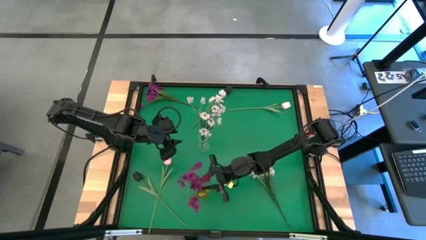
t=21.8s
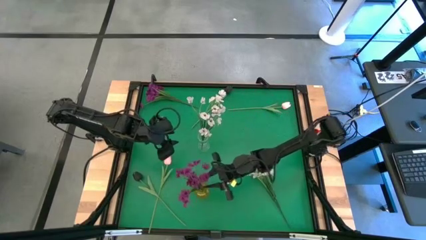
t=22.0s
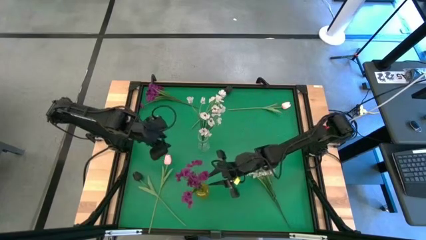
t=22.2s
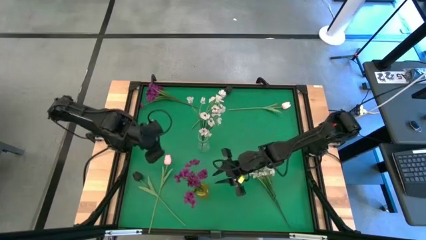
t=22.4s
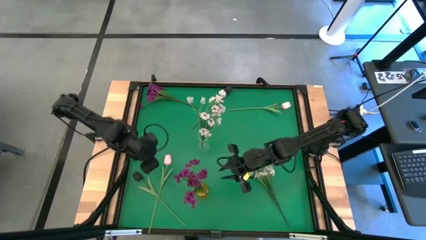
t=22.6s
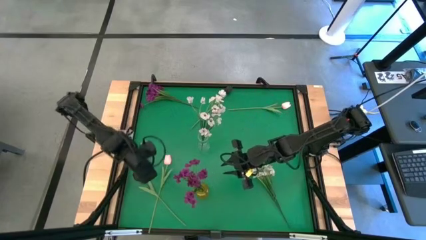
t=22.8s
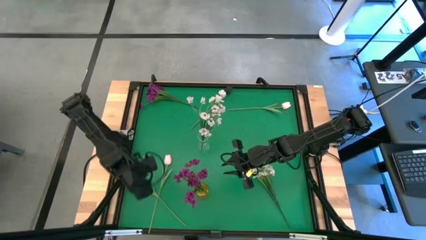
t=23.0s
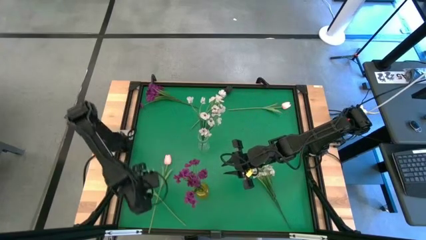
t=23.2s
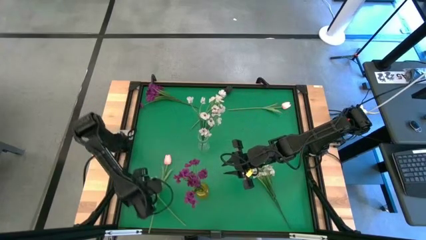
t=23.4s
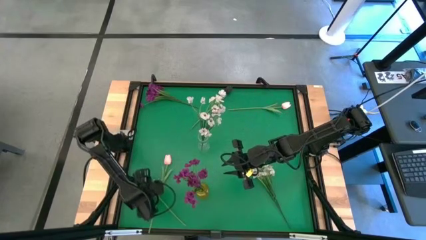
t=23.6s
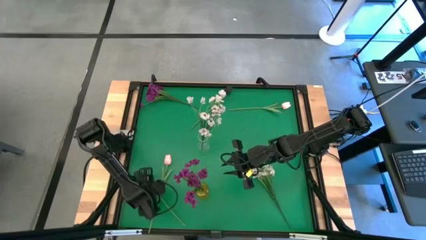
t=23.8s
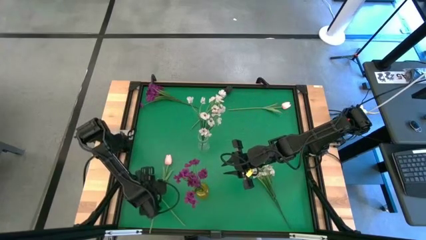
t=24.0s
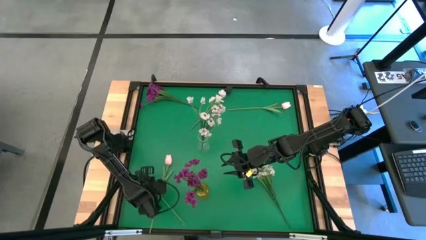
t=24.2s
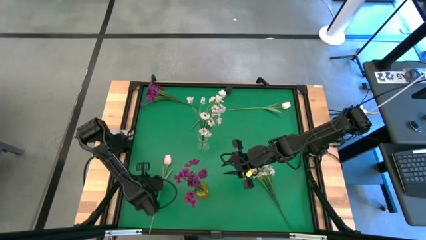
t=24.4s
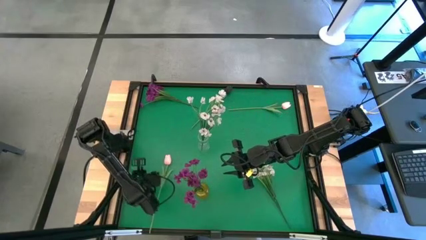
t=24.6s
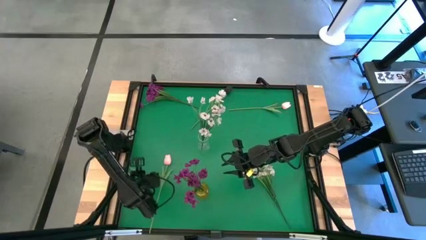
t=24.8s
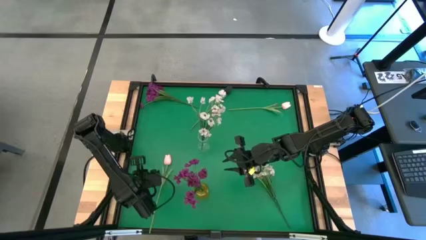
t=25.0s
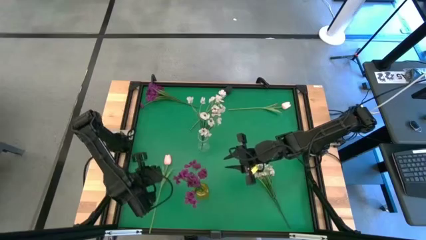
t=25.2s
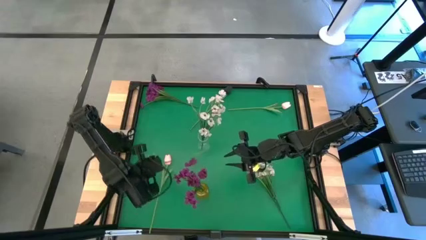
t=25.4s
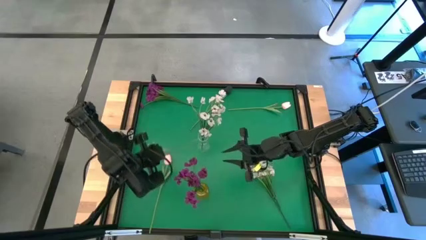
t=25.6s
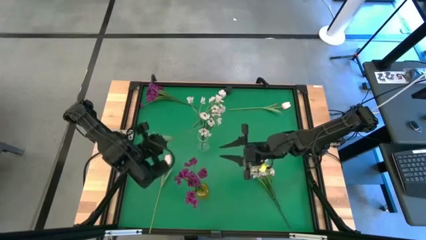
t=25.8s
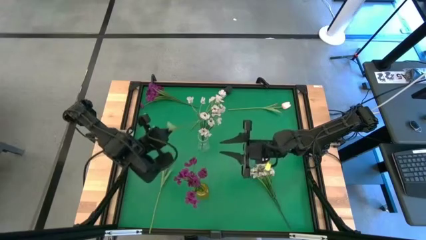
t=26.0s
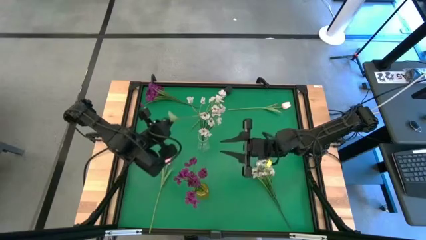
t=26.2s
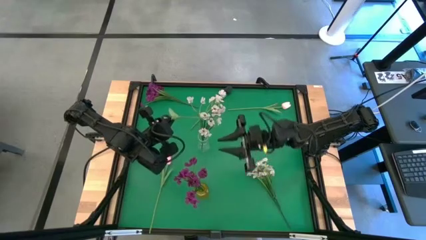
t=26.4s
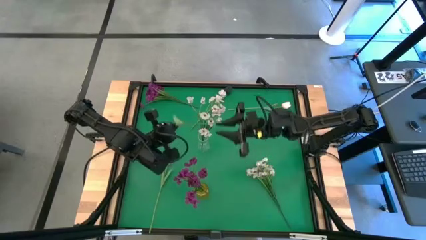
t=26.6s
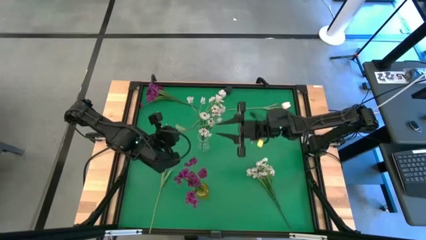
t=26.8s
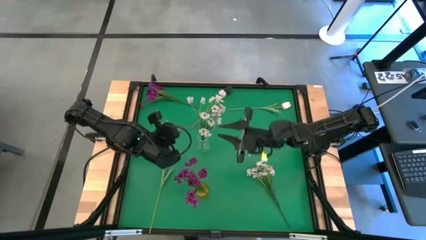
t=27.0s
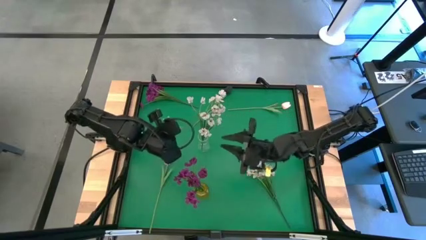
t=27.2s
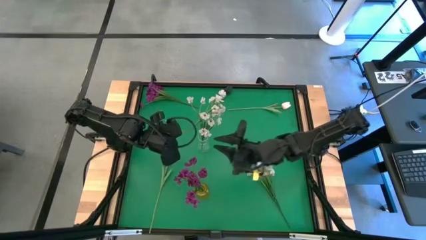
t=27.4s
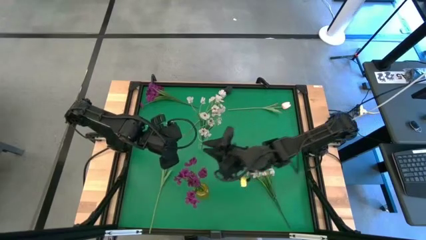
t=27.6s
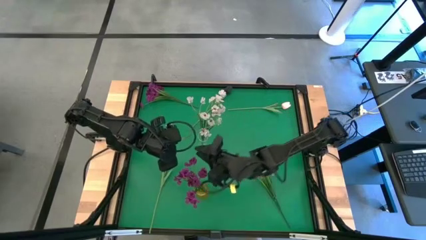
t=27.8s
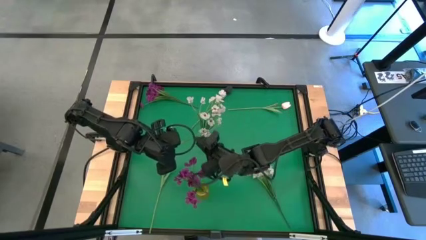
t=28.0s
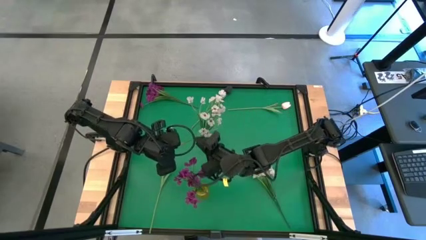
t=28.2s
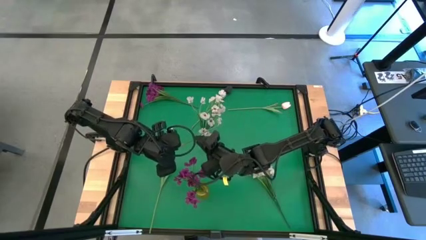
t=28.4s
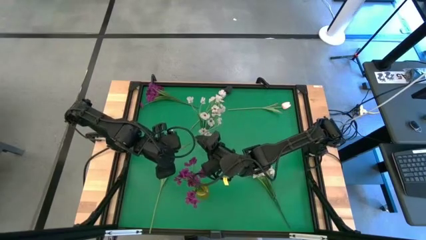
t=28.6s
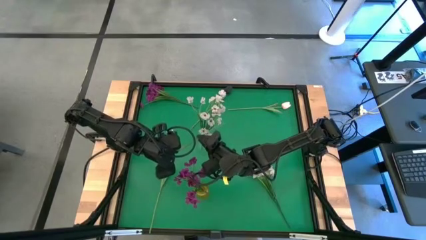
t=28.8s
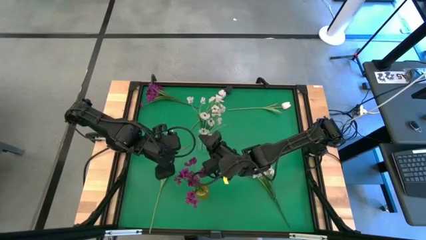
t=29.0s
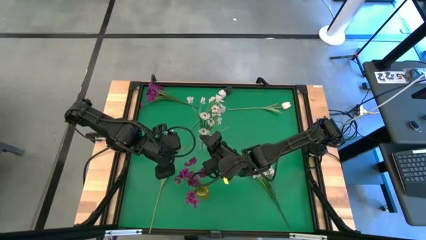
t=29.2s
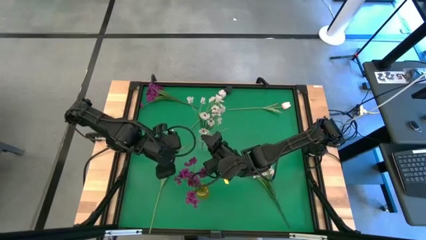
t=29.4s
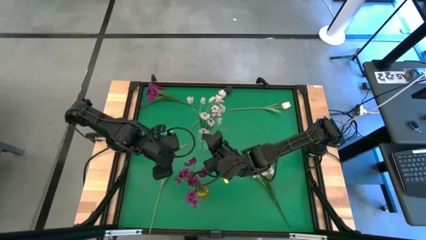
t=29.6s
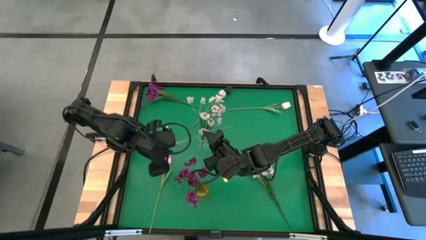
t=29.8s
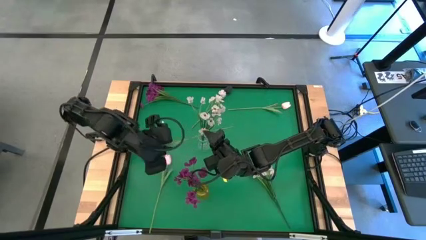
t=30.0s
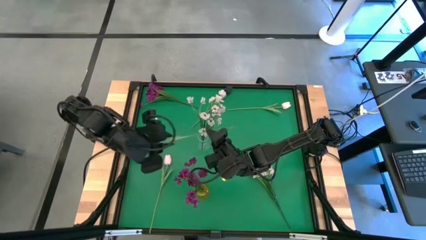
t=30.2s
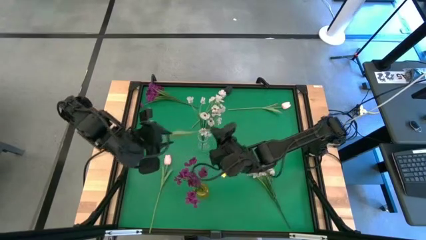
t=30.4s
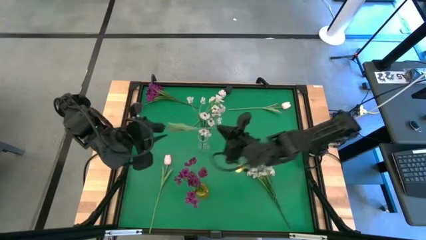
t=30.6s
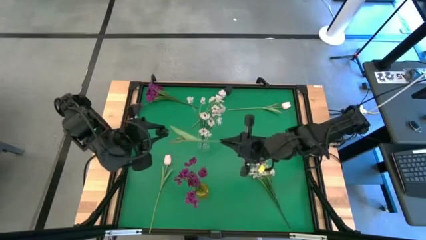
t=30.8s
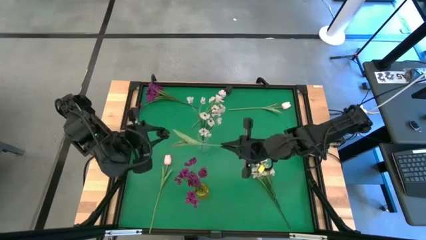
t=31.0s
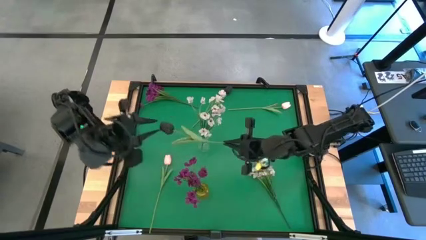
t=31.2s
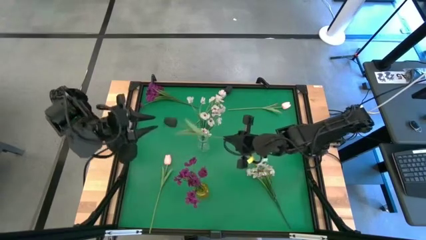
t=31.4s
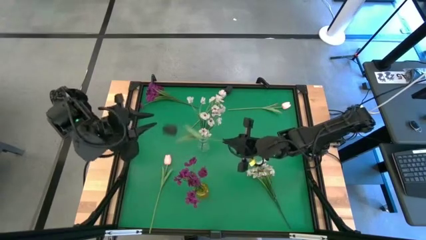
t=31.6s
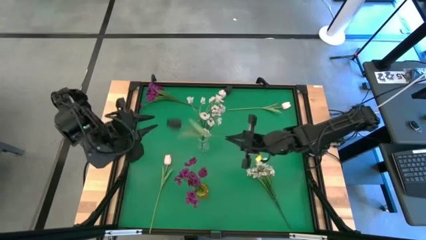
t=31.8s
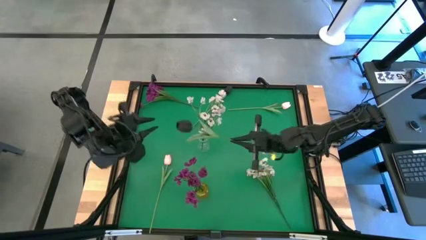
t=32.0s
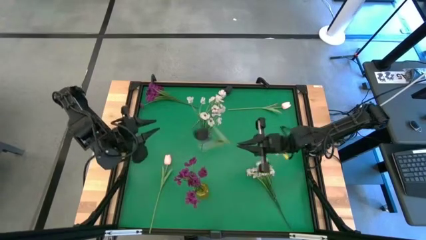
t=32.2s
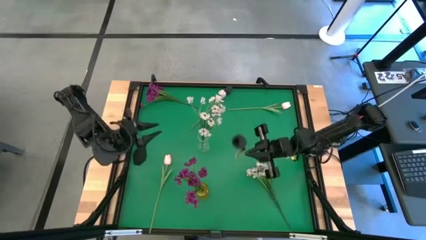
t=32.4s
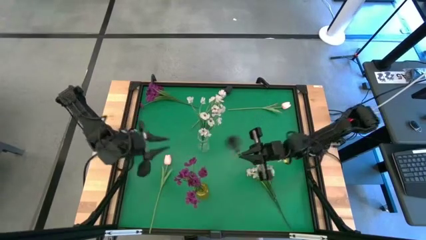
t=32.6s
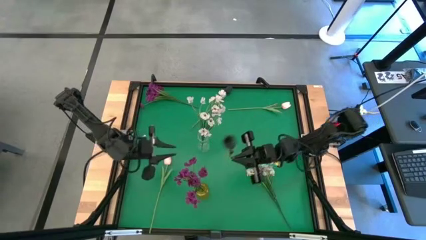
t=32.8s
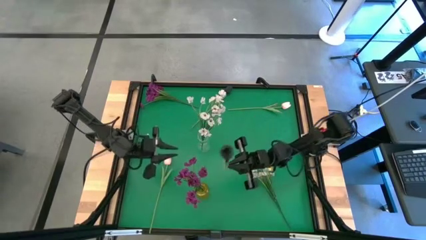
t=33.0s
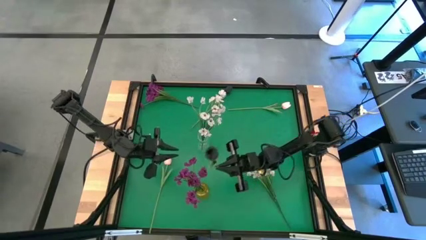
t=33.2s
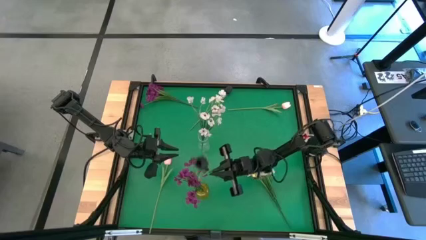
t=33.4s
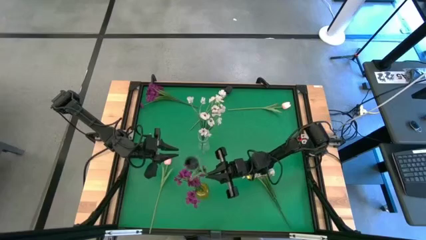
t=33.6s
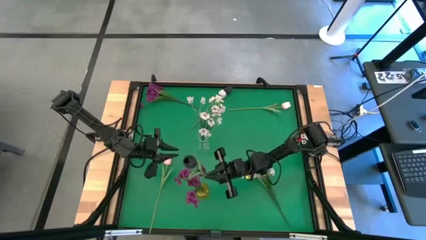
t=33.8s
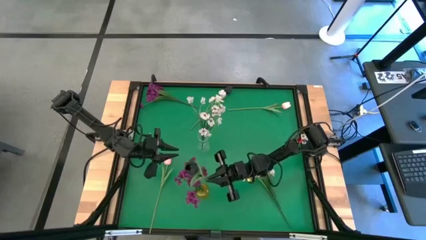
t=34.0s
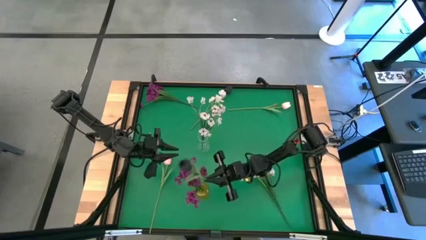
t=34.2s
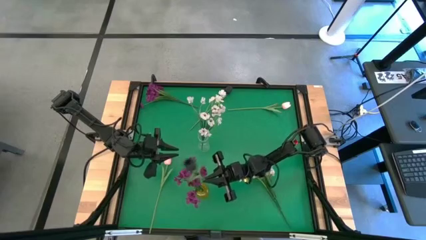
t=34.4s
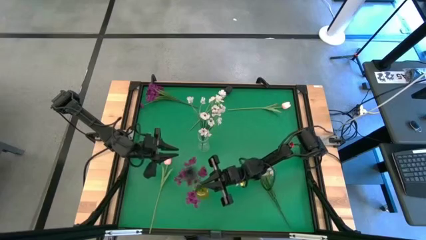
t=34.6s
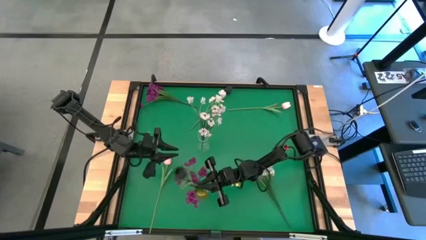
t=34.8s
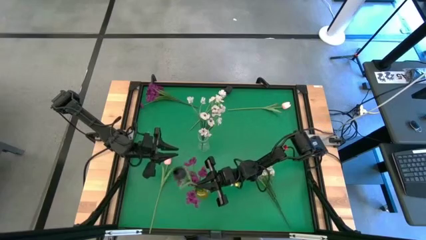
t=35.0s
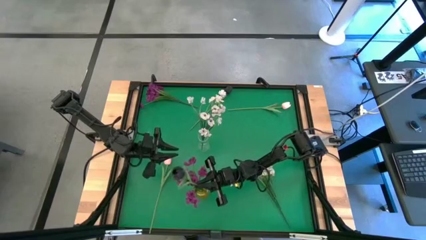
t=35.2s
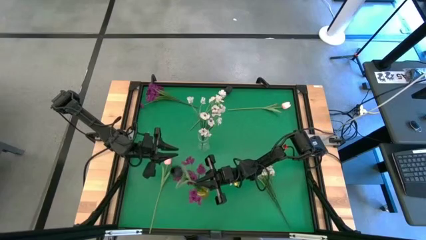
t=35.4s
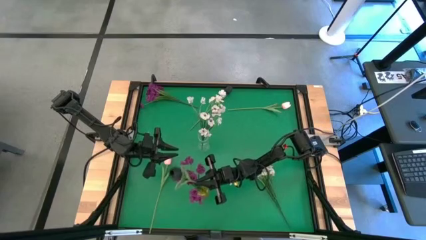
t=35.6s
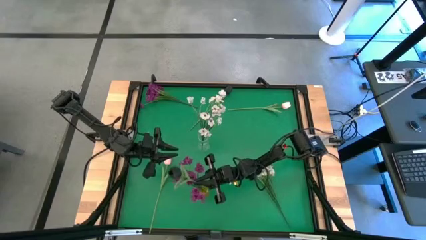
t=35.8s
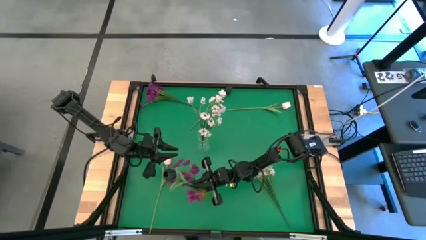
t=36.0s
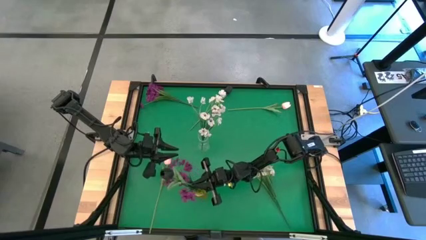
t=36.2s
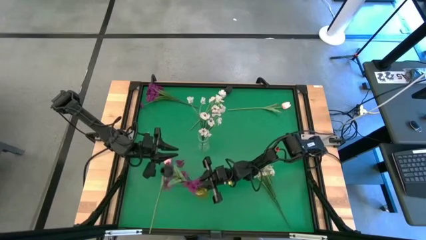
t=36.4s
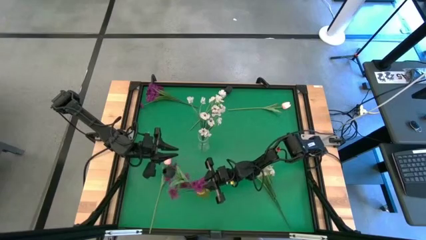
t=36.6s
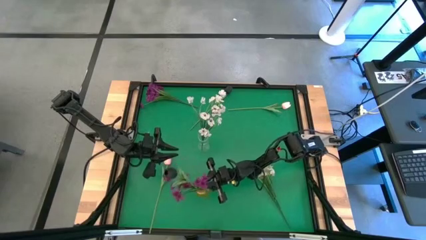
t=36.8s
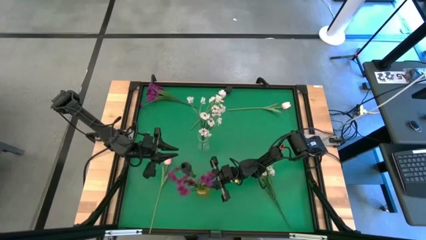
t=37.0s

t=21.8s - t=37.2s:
Task: Sort flowers into vase by color
Put the bottom black flower into the yellow vase

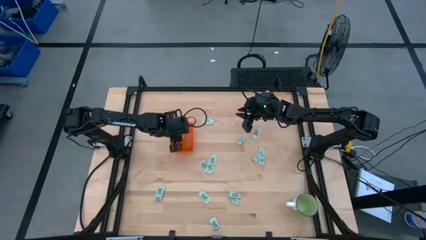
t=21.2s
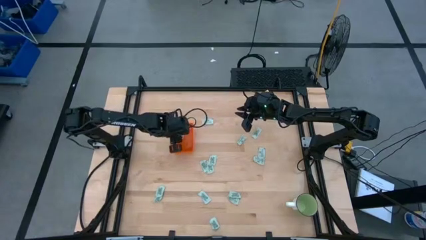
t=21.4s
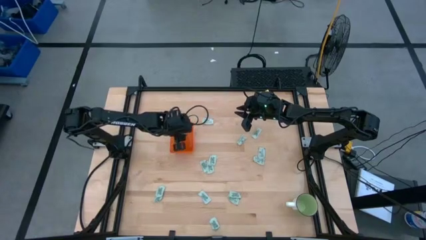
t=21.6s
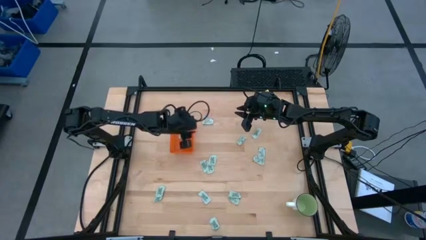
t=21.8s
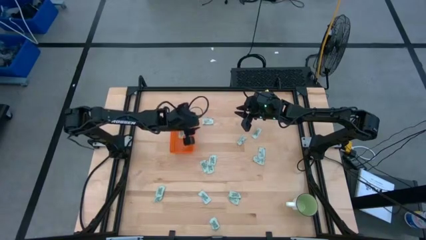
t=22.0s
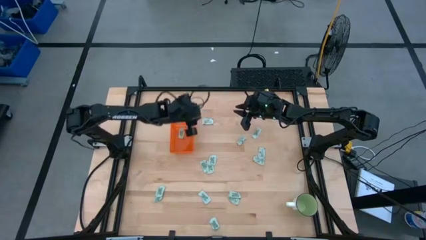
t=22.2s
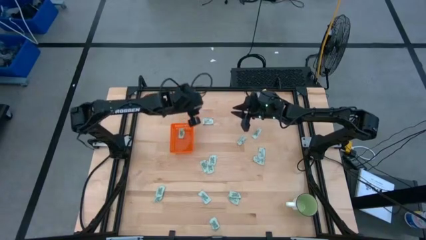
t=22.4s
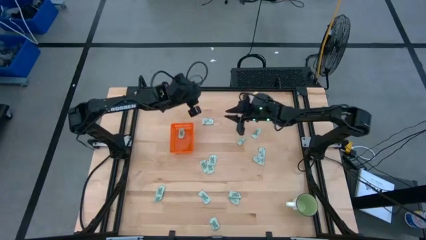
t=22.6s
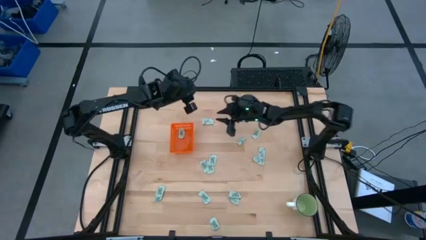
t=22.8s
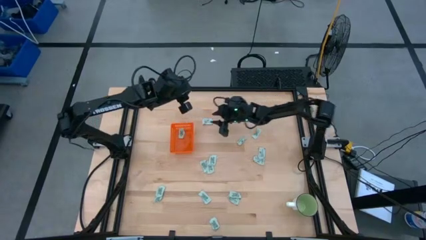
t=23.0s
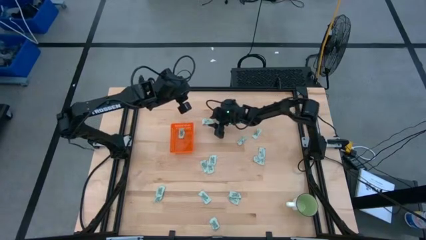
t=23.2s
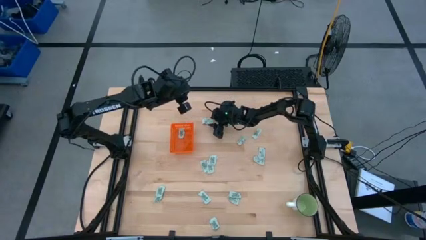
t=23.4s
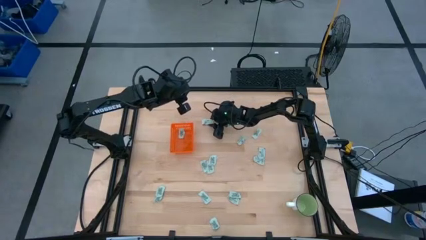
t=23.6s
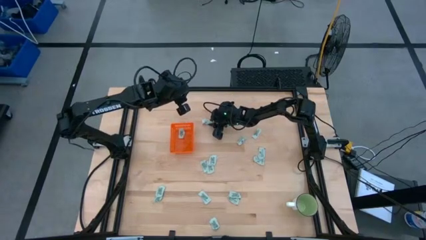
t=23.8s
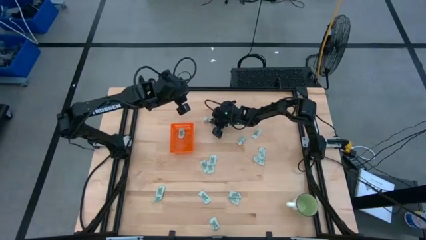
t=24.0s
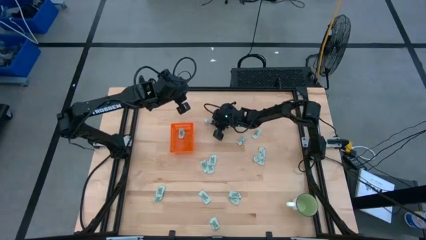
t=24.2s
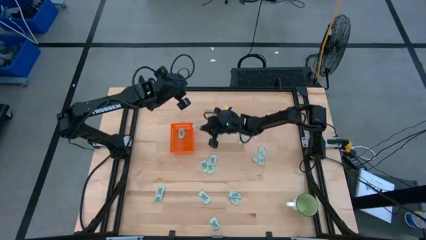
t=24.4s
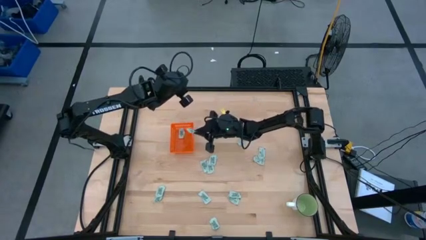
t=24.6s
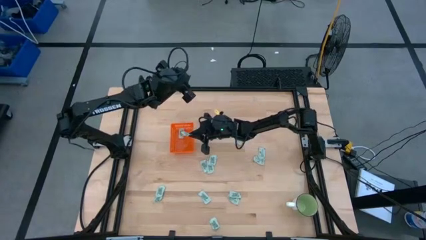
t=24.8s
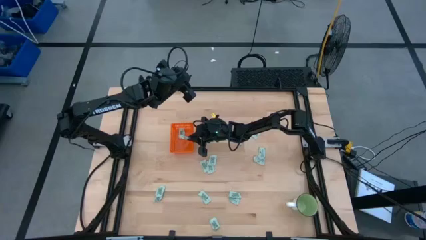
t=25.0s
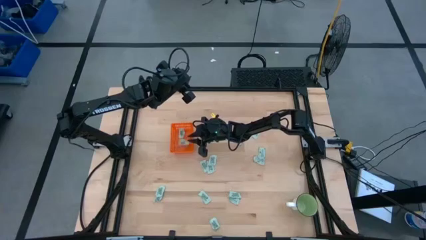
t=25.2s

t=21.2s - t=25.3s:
Task: Pick and place Stevia / Truvia into bins
Put the green stevia packet into the orange bin
